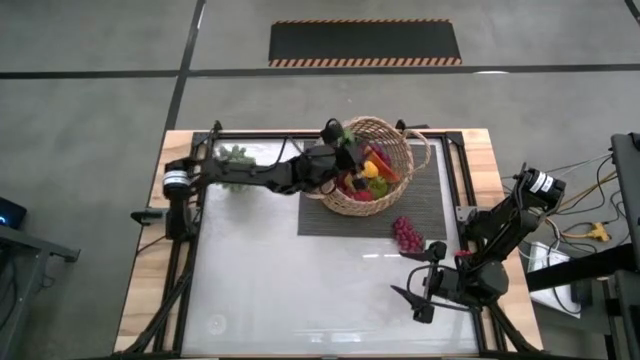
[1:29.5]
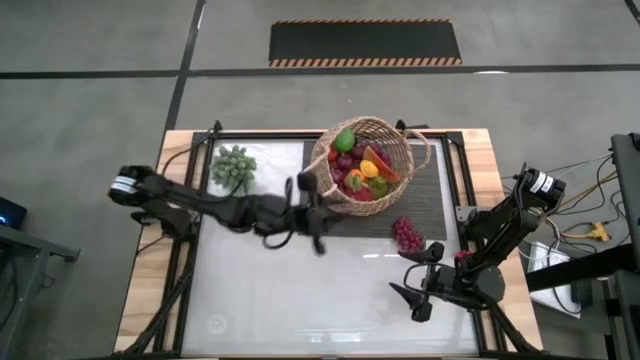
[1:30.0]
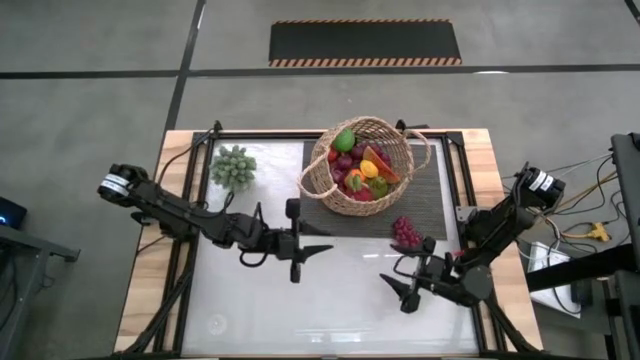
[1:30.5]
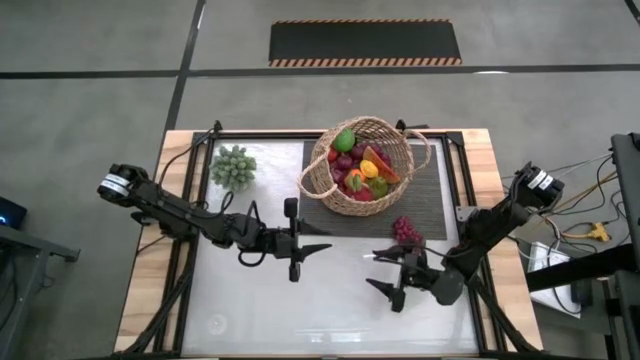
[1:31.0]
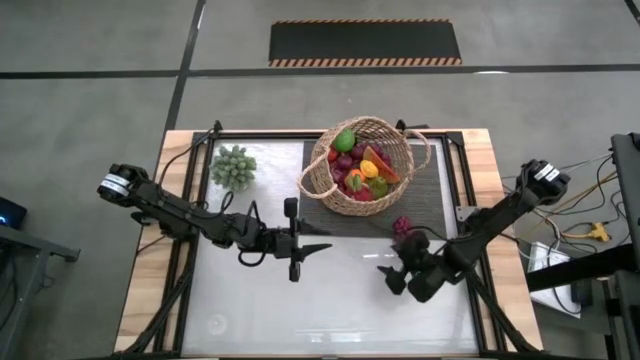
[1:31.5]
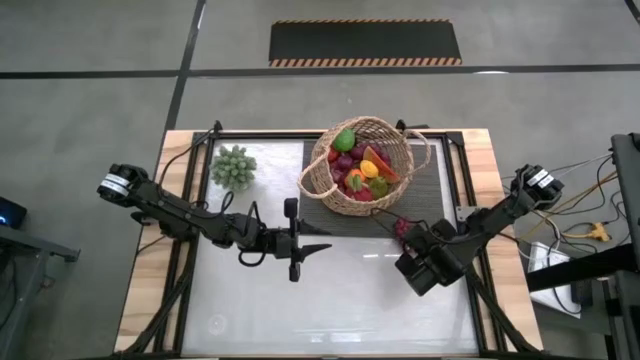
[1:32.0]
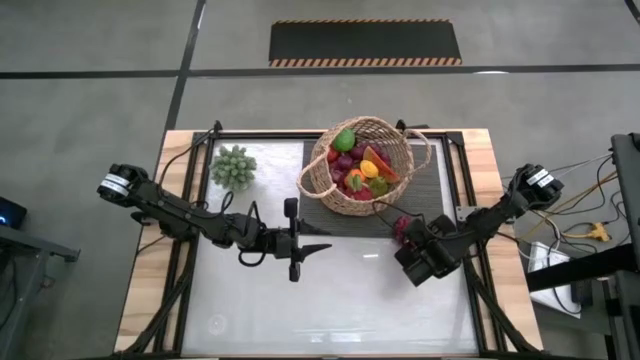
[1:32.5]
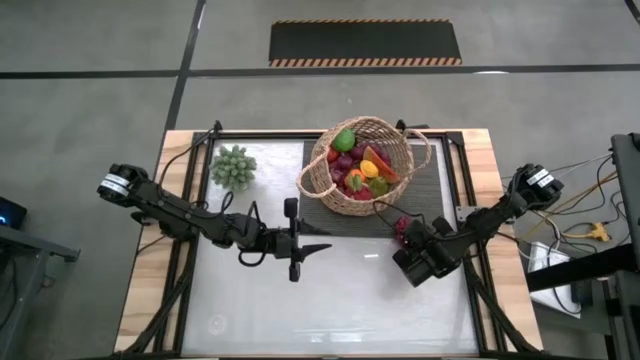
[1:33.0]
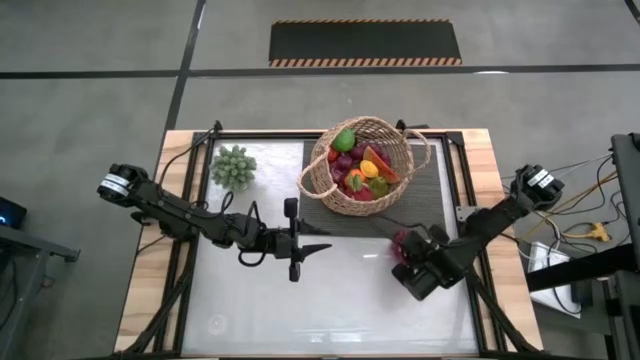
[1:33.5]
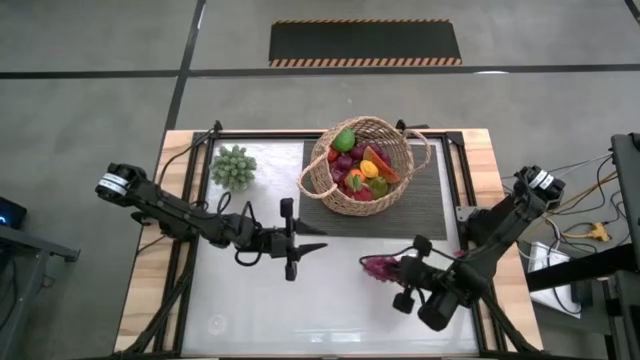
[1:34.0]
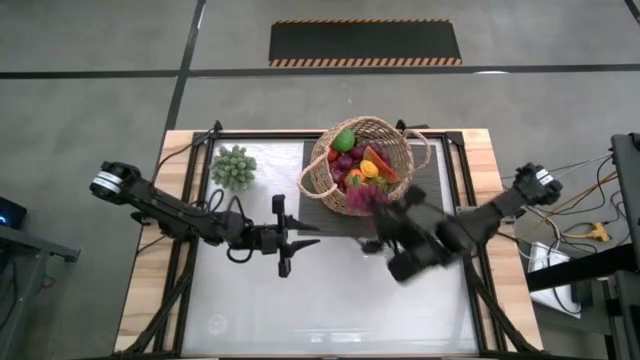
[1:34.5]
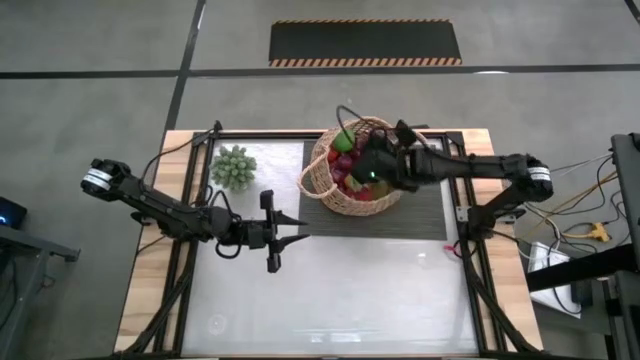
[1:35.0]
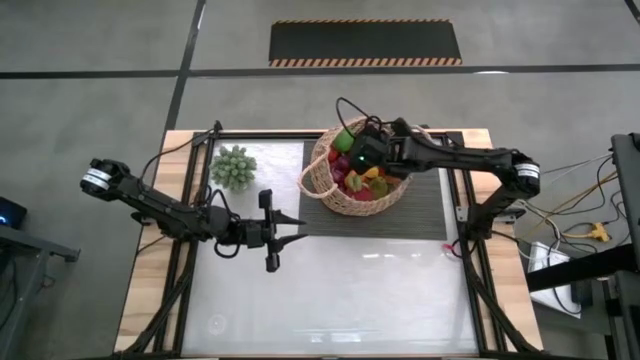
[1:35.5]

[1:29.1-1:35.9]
Task: Build produce basket
Put the red grapes into the brown basket

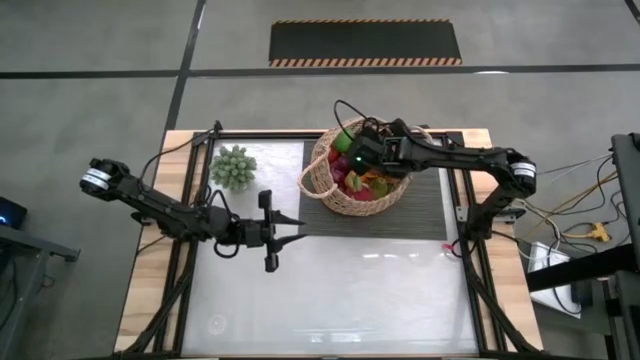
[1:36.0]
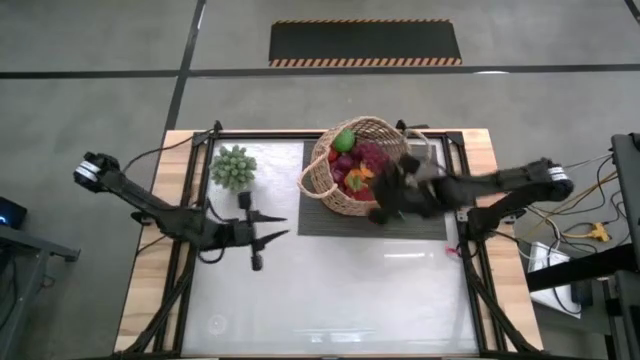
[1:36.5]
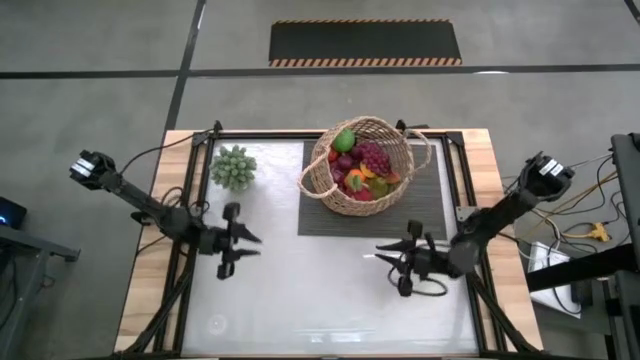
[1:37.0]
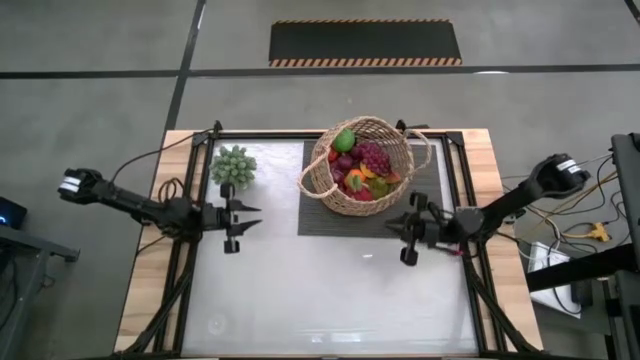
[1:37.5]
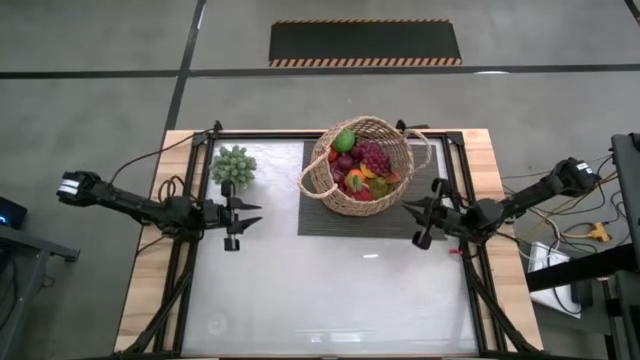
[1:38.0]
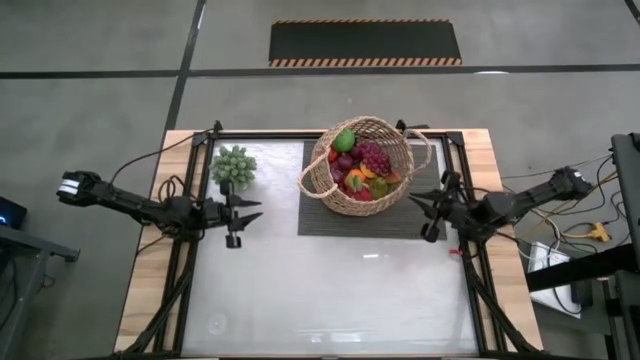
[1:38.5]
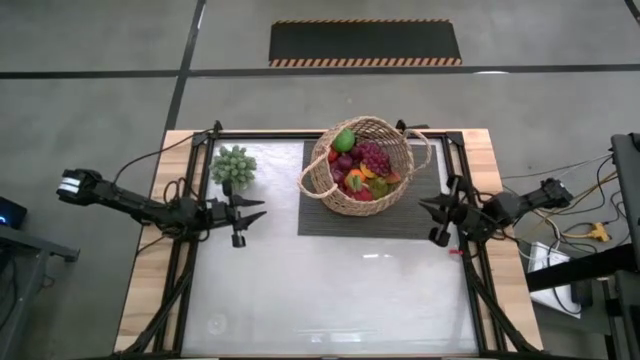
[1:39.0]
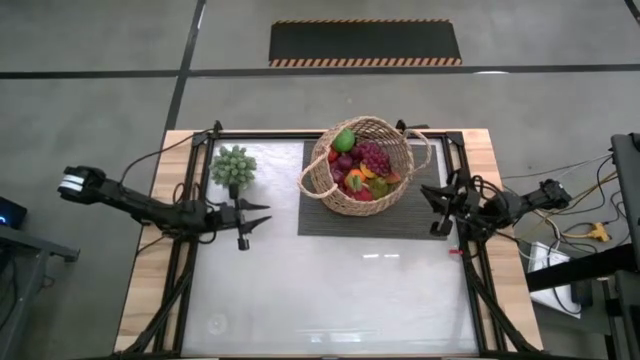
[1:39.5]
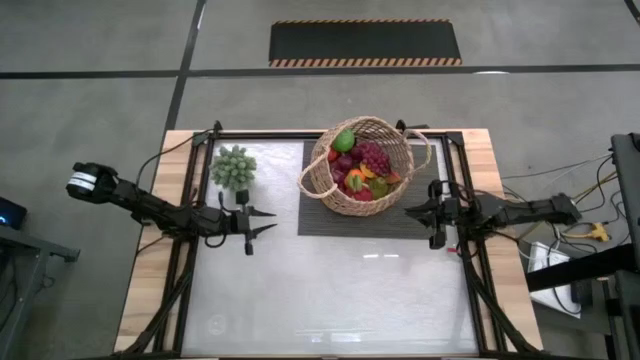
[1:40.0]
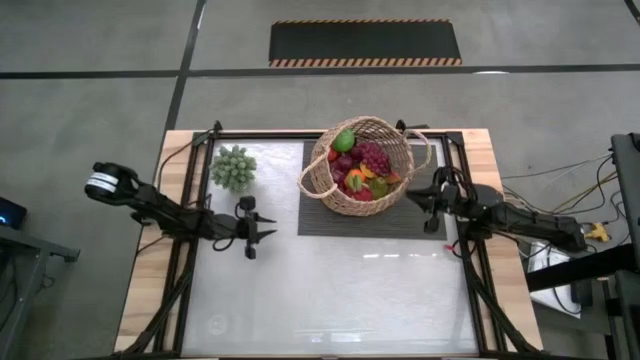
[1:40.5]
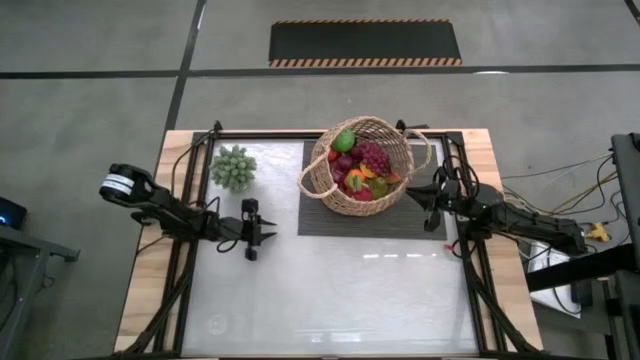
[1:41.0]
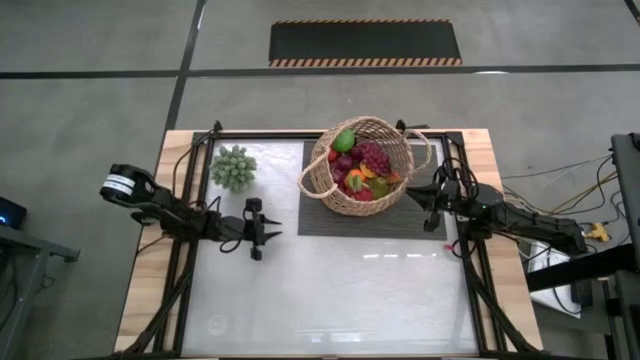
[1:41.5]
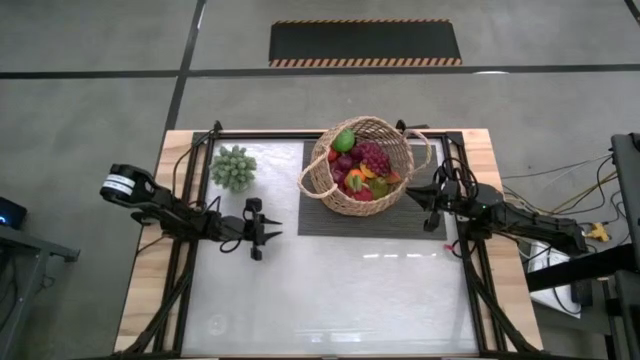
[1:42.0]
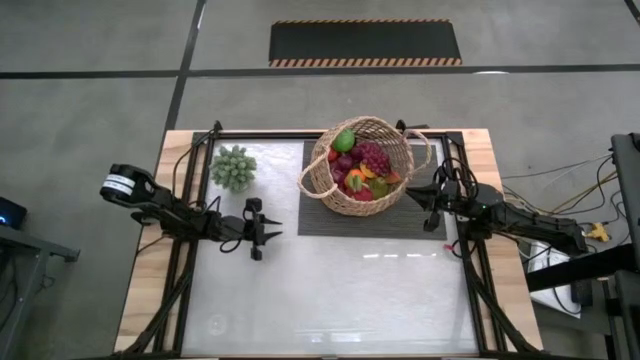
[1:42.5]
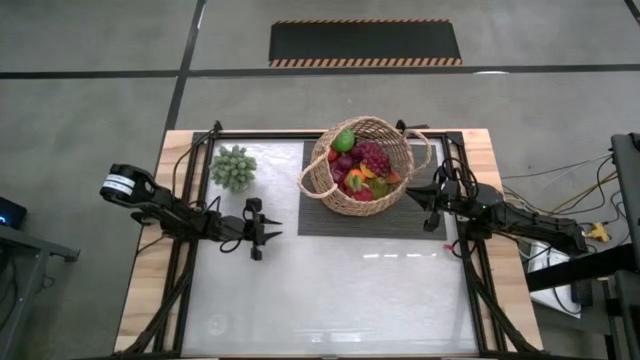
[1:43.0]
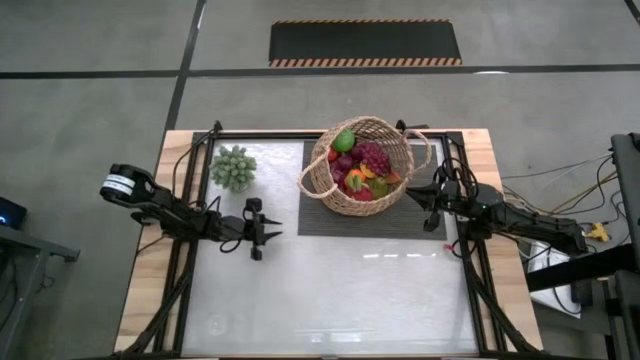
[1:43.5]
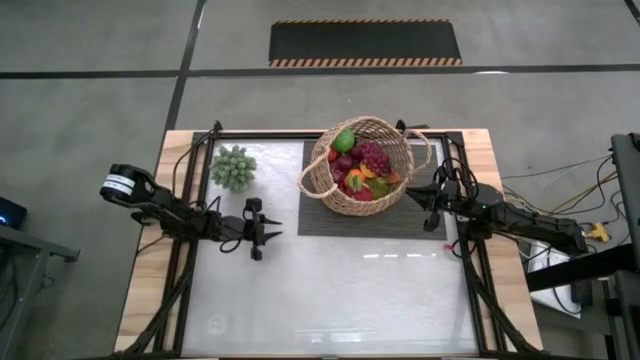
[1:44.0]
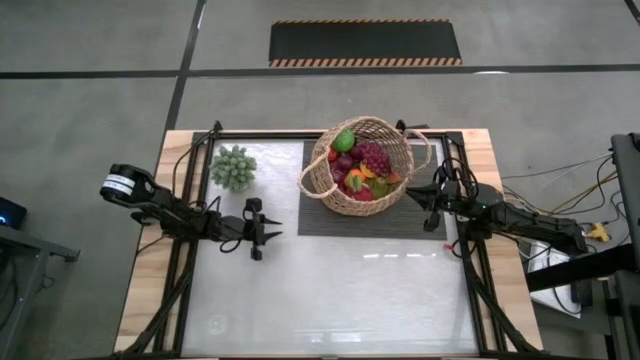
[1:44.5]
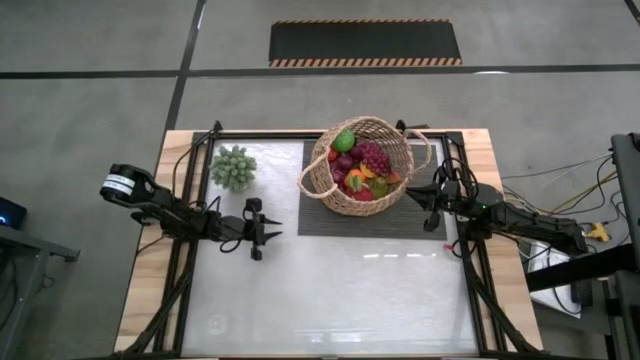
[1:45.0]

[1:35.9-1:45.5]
Return to Home Position

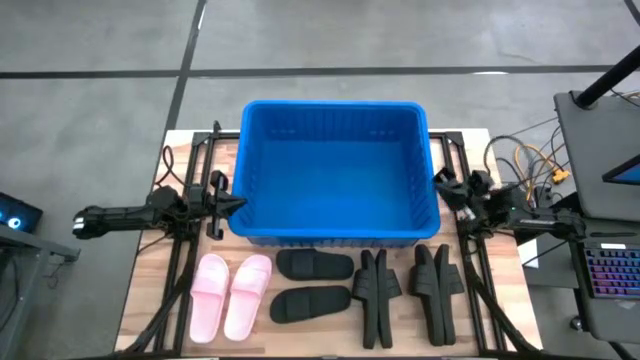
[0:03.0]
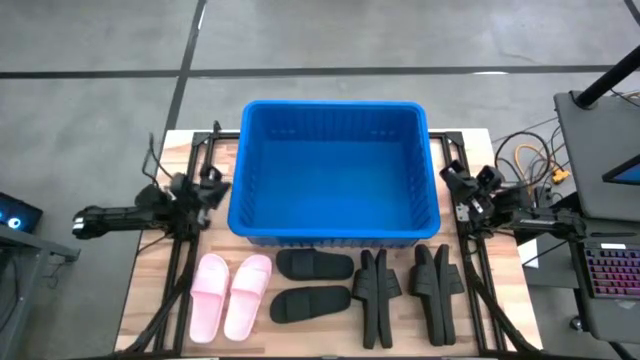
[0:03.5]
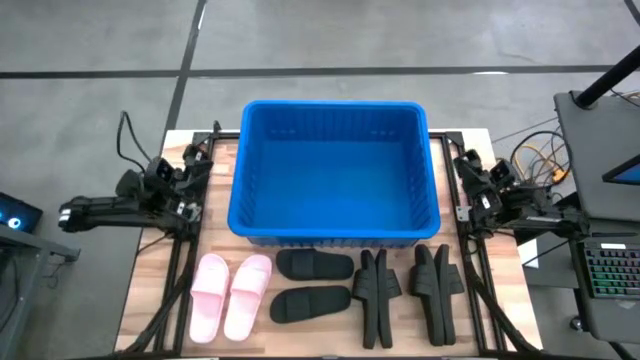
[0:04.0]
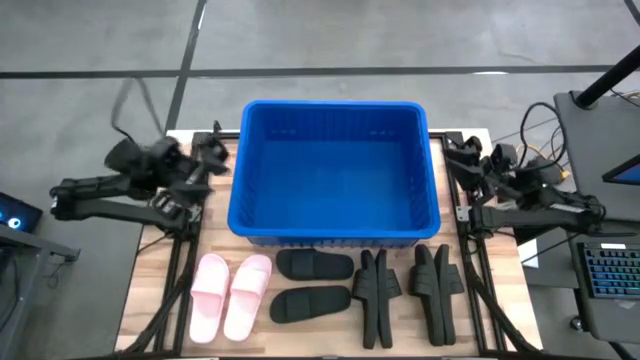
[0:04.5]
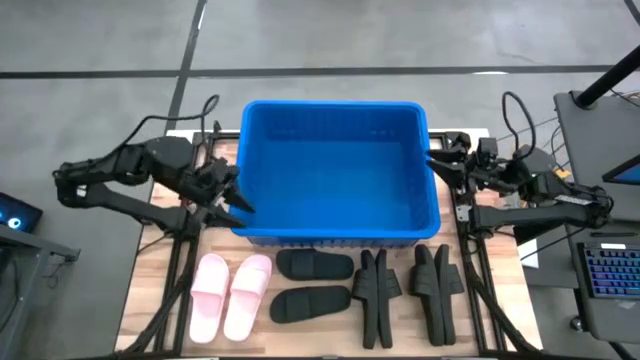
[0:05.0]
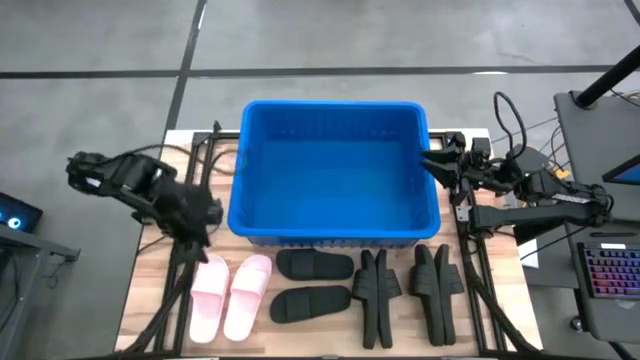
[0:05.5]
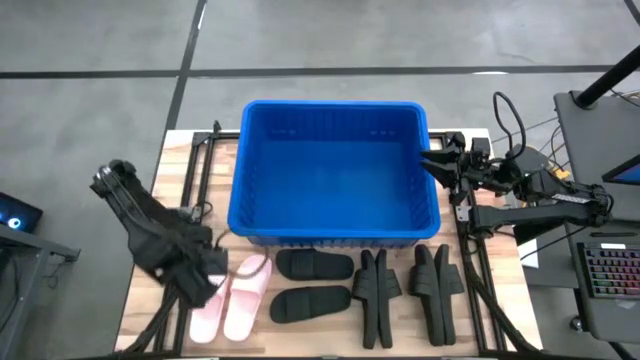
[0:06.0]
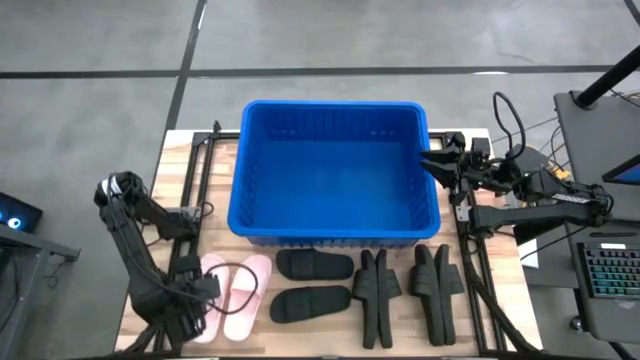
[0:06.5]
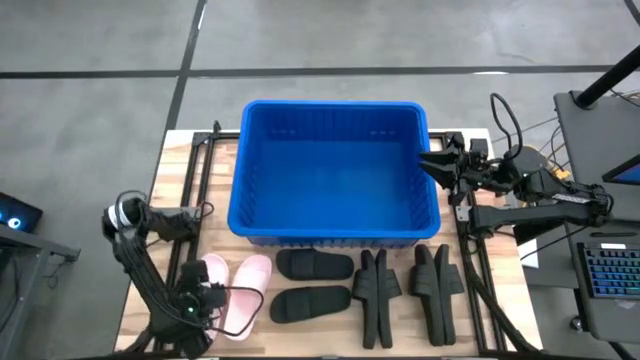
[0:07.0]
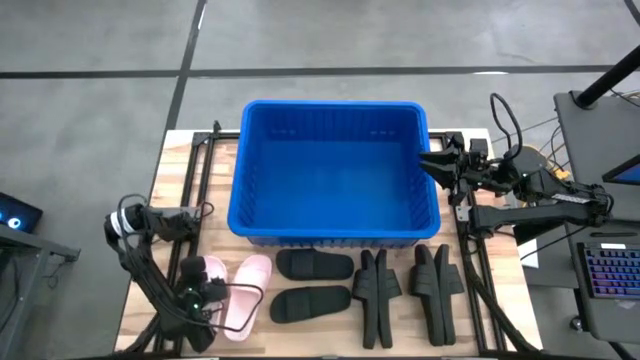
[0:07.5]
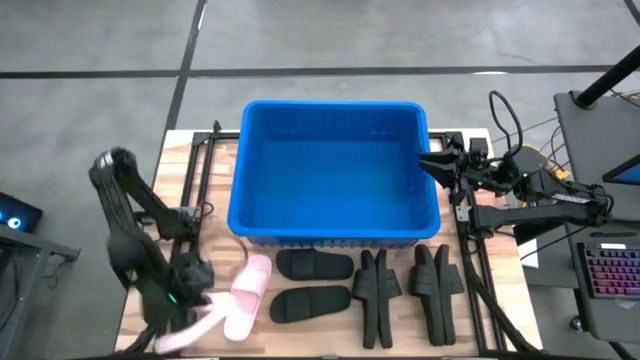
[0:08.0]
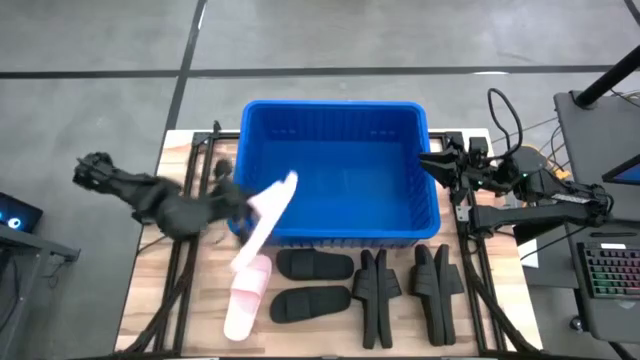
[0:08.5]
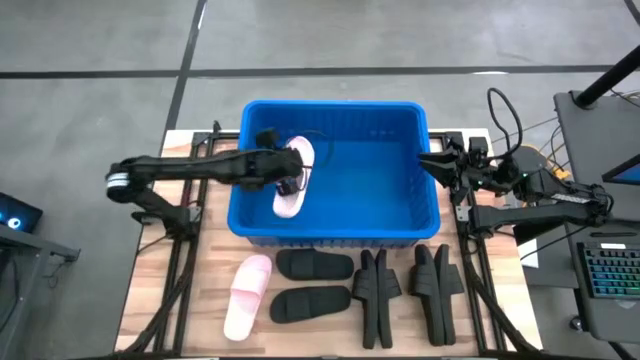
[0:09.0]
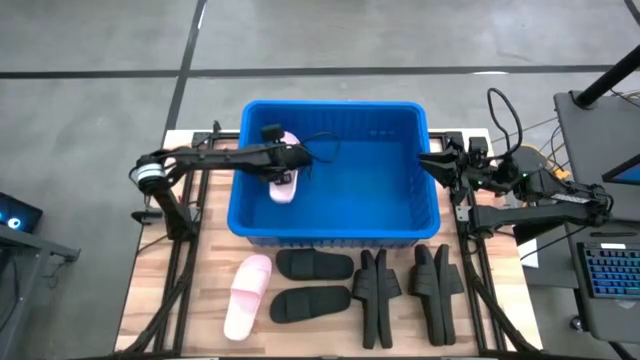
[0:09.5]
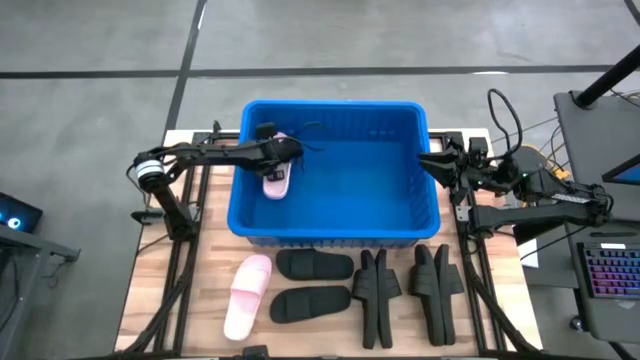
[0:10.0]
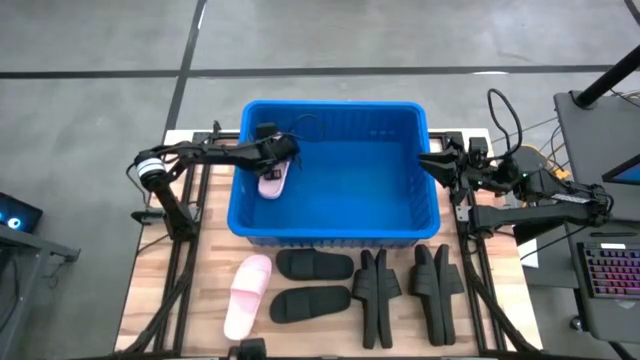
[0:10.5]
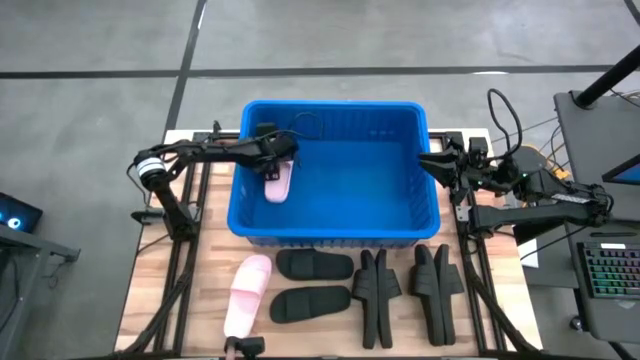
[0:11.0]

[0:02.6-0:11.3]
Task: Pick and place slides into bin
Put the left pink slipper into the blue bin
